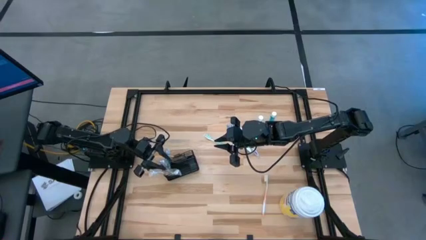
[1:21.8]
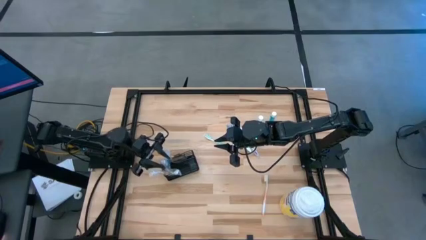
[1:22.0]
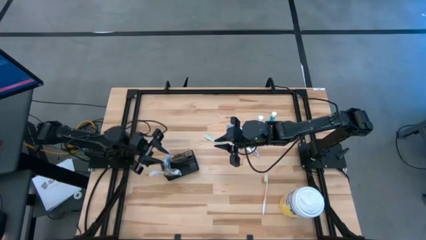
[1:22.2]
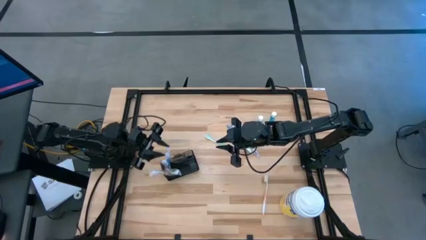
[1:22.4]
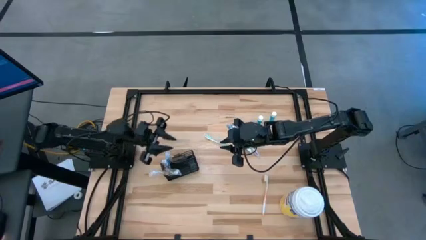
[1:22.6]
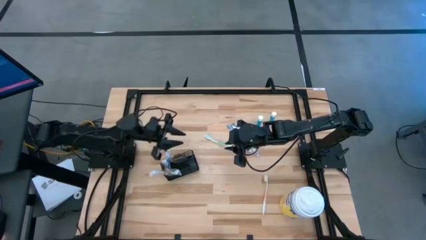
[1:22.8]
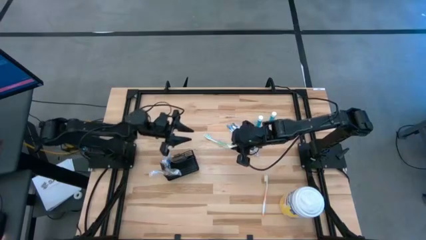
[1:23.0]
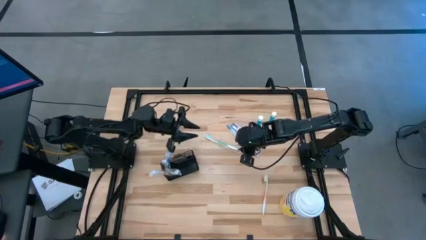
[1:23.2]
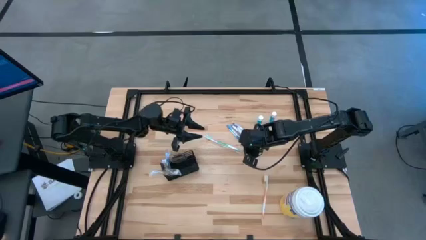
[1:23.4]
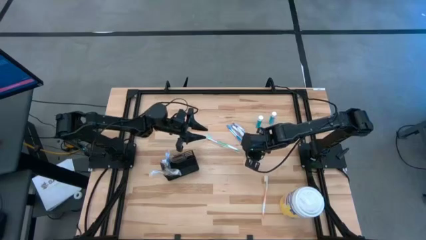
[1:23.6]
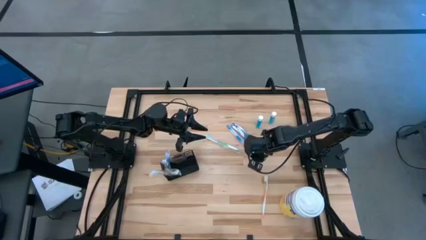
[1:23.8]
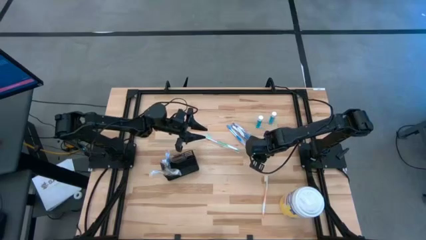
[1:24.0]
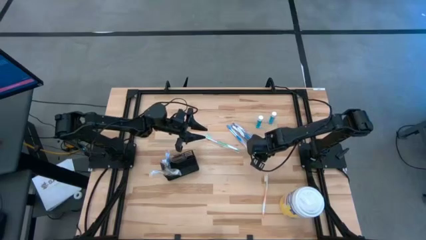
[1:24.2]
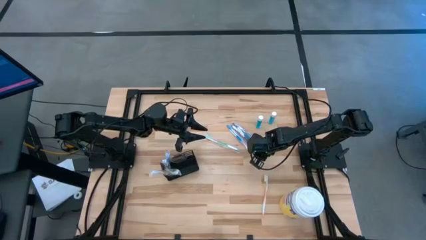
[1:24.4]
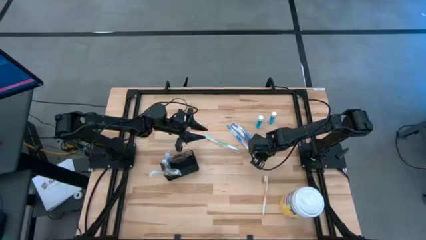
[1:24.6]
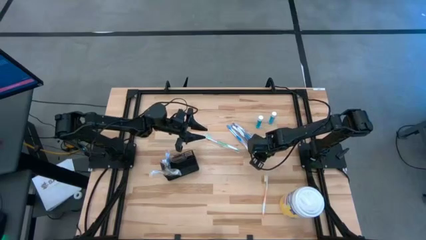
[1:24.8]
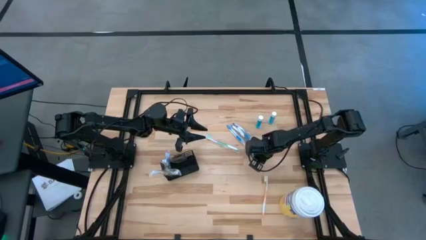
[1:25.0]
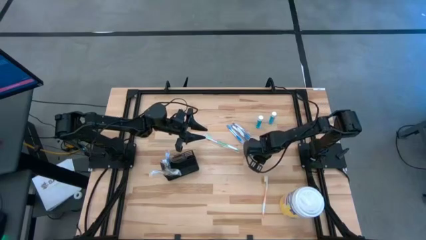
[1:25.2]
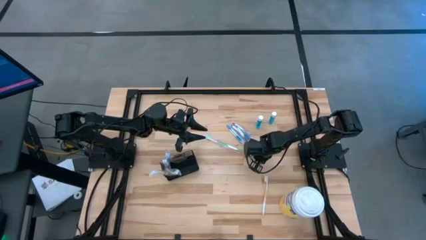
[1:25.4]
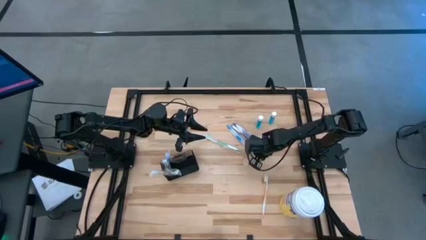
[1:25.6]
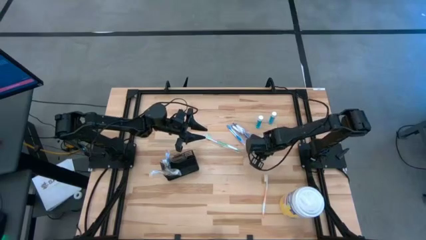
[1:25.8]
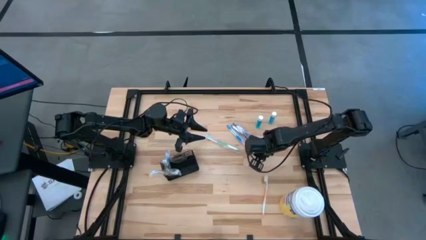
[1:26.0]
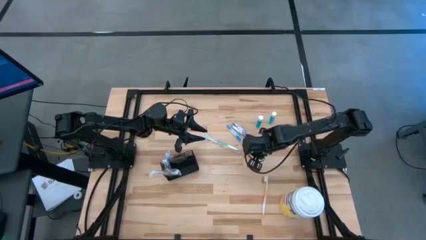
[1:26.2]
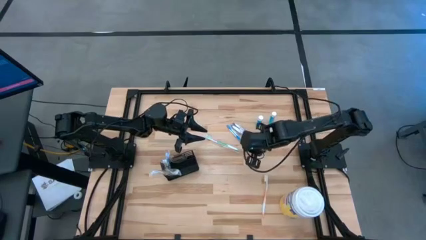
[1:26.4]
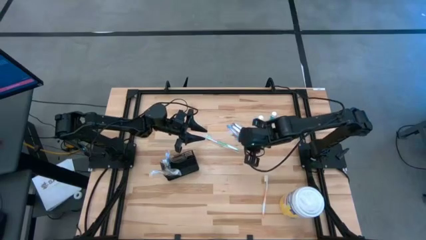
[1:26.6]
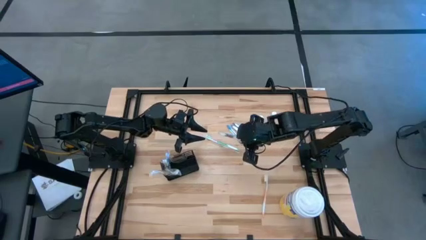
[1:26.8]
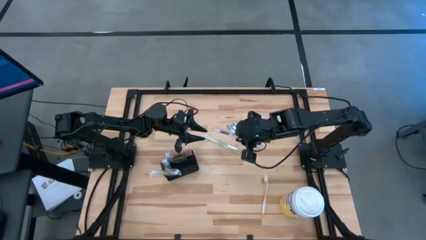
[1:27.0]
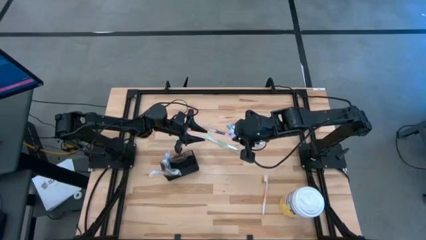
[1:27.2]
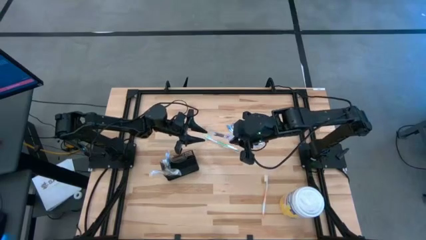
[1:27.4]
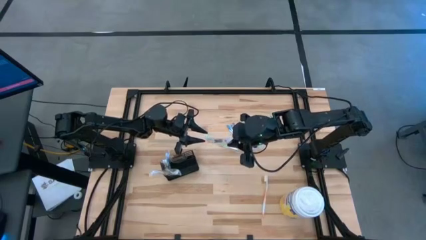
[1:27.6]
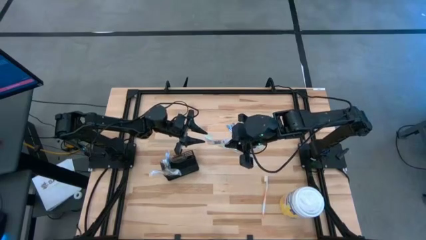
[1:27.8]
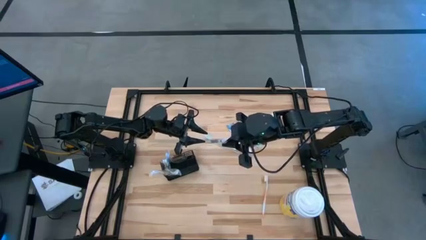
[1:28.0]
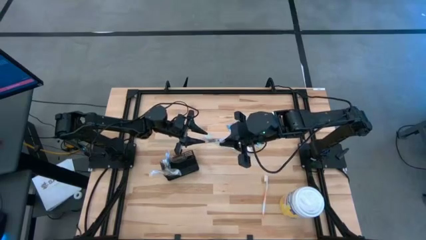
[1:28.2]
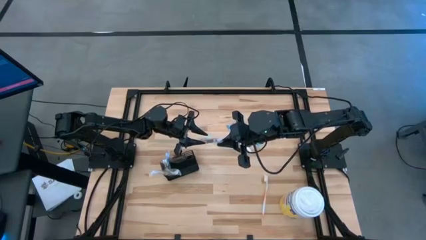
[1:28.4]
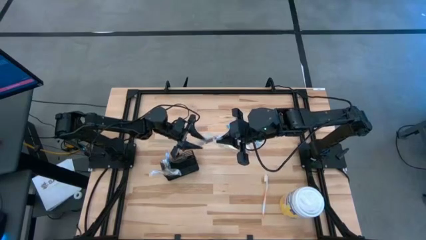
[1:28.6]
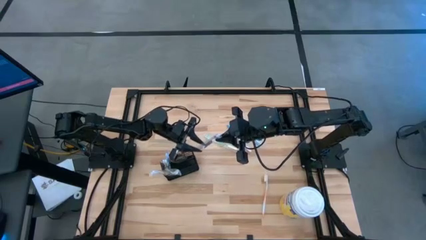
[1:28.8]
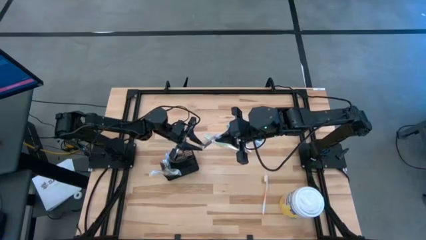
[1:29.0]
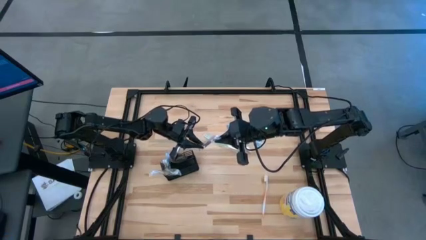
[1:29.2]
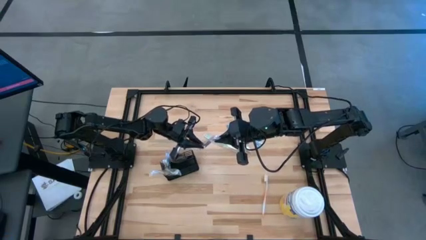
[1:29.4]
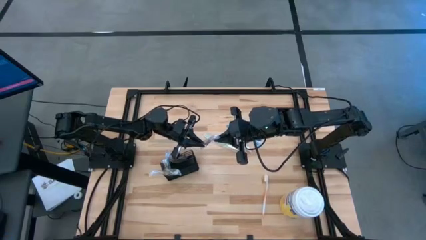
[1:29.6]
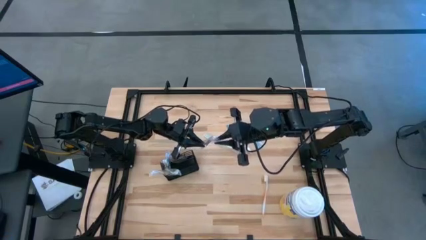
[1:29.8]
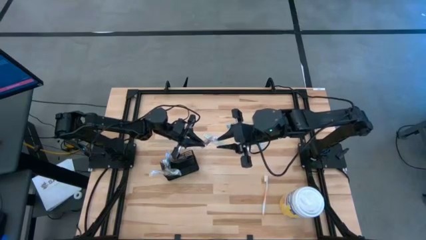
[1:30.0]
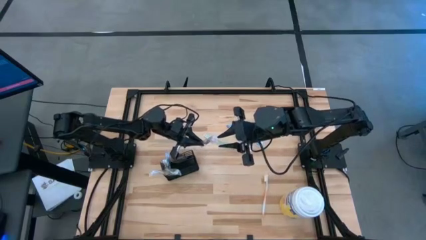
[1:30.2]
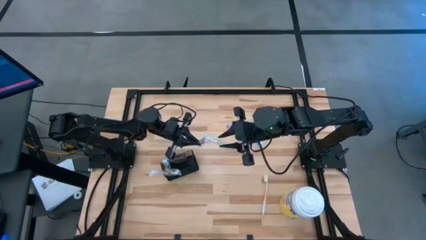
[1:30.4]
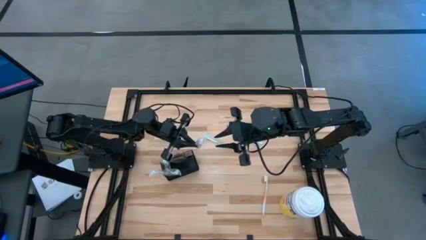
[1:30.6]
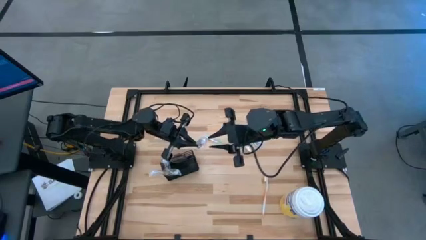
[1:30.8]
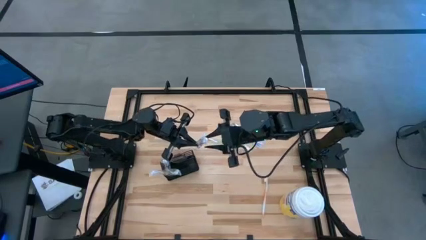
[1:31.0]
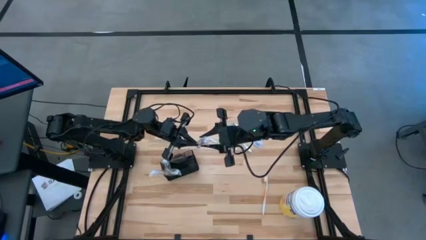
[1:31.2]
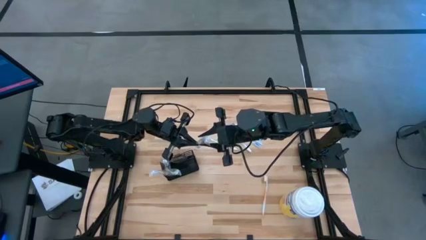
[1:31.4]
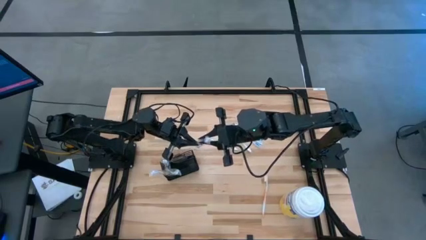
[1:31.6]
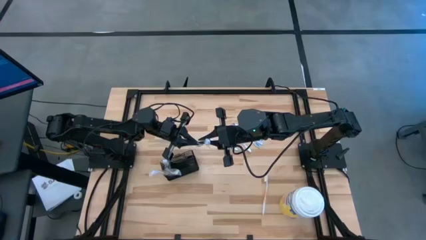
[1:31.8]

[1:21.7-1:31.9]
Task: Pick & Place toothbrushing station
Put the left purple toothbrush into the top right section of the mesh organizer

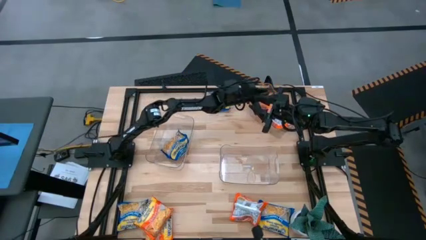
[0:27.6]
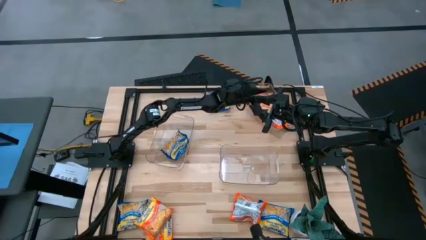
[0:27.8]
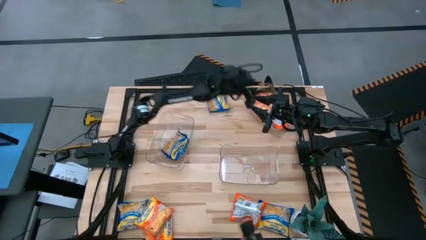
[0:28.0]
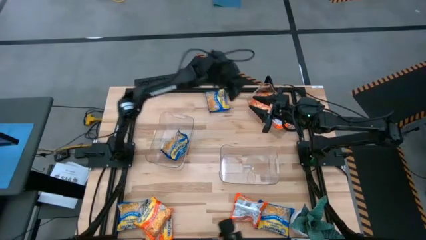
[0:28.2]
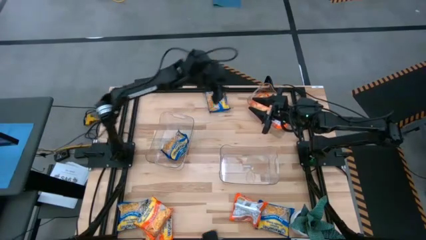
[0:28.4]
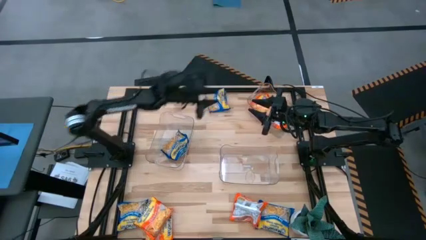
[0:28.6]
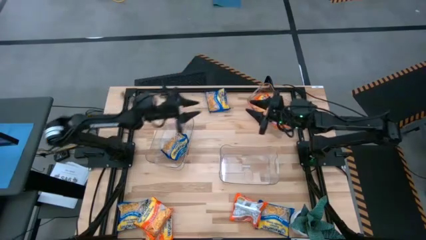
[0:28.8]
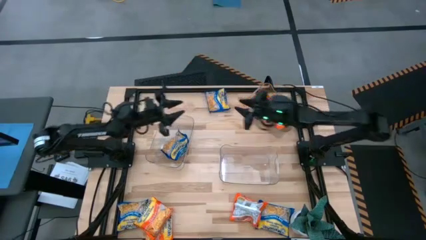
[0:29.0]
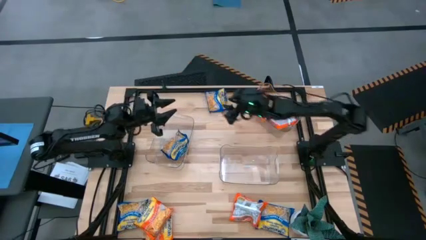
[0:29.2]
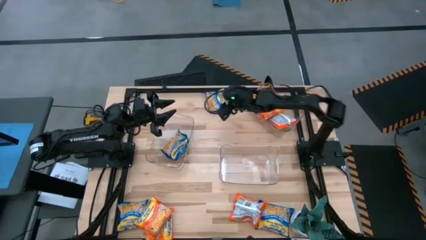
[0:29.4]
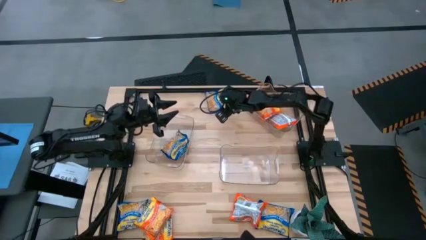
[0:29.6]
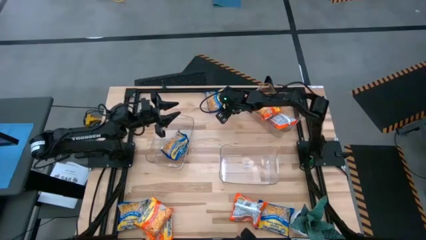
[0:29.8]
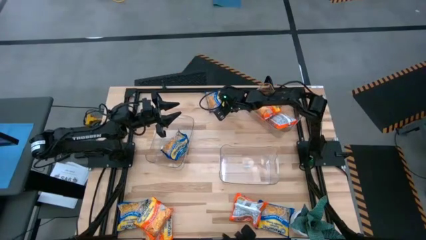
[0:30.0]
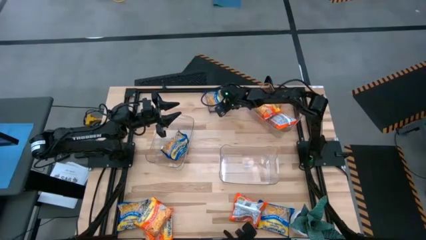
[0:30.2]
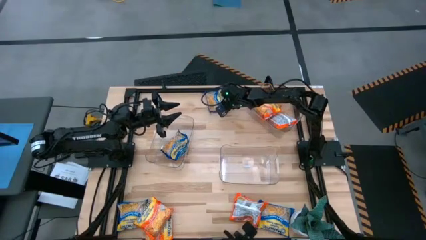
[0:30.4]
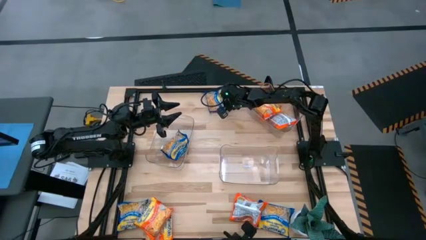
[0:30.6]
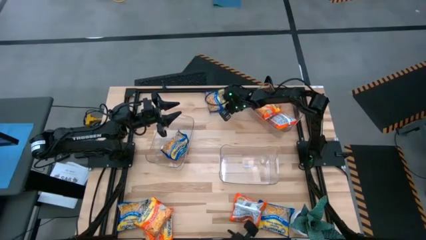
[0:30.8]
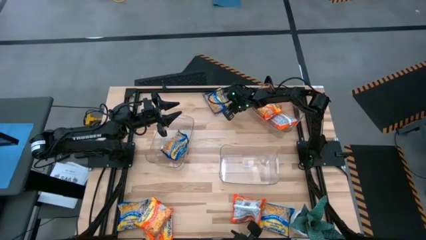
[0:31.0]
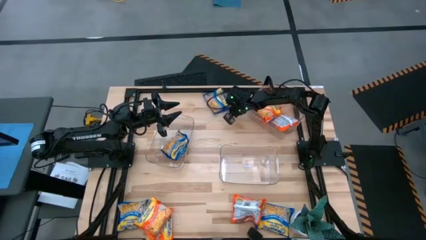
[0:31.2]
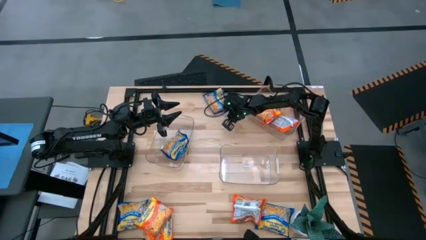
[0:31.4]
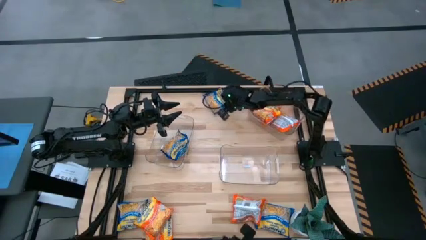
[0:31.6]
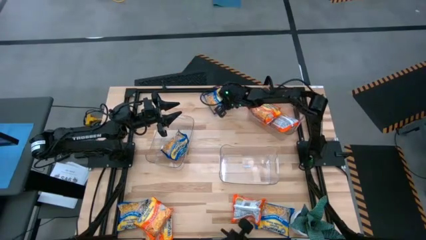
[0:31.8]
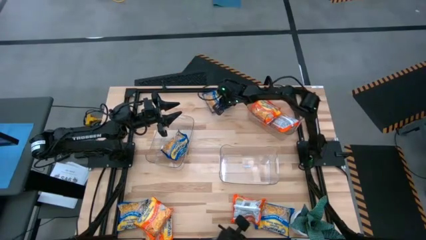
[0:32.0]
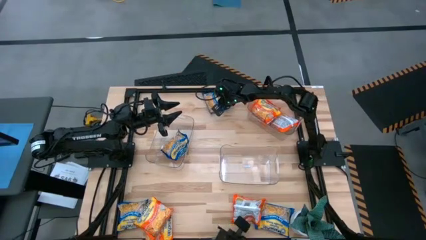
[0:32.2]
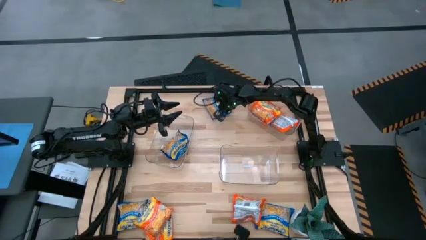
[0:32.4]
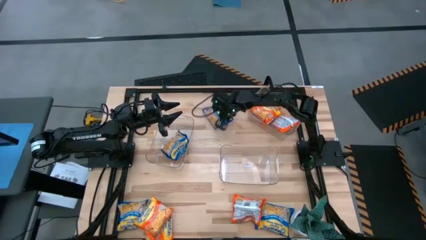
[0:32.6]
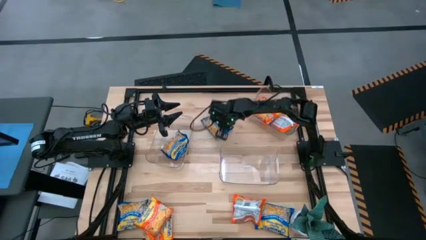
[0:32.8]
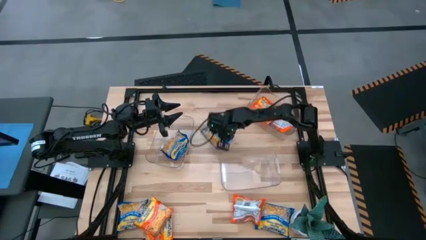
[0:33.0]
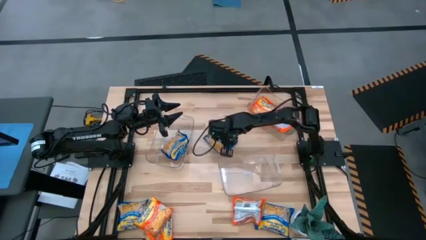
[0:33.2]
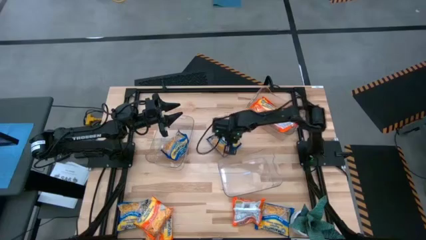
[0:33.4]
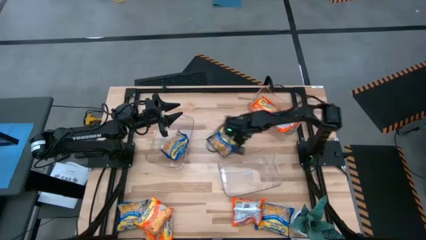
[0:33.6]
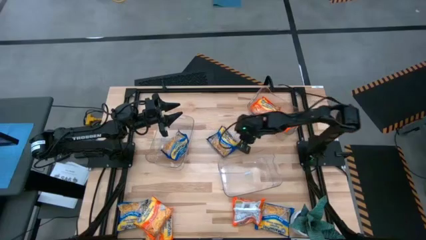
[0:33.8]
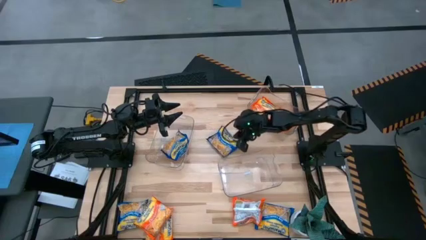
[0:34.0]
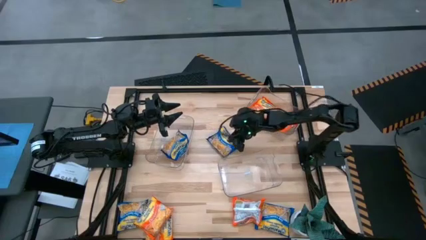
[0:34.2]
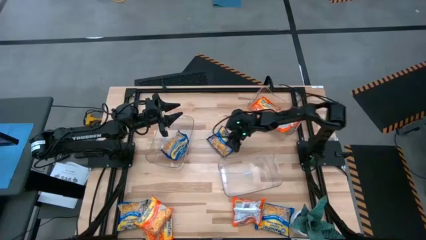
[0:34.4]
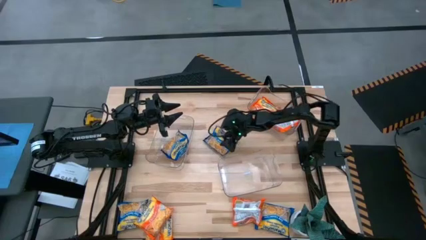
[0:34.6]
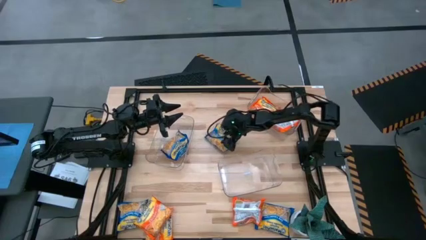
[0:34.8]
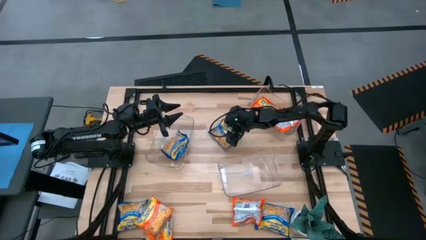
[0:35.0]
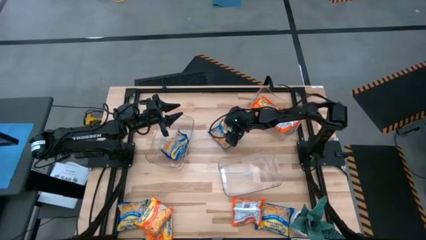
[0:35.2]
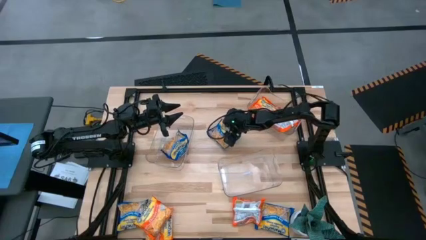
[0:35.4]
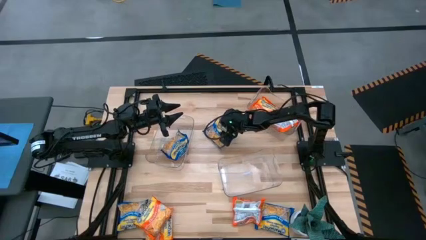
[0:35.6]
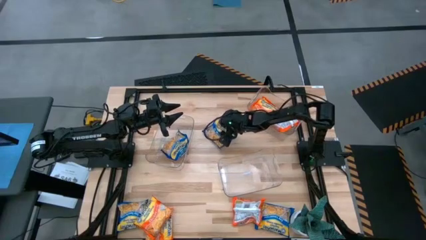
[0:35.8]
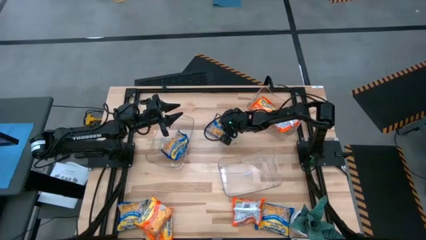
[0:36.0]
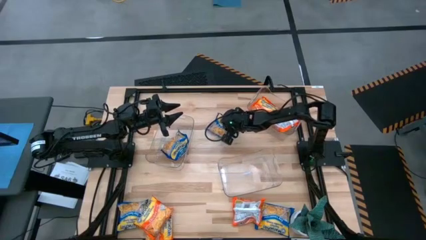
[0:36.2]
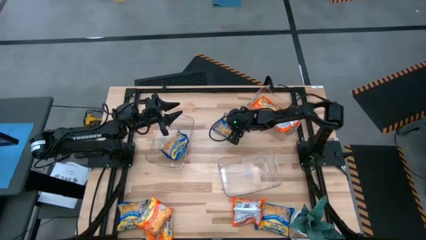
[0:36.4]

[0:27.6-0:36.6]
Task: Sort Maruchan noodles
Put the blue noodle pack into the middle transparent bin
